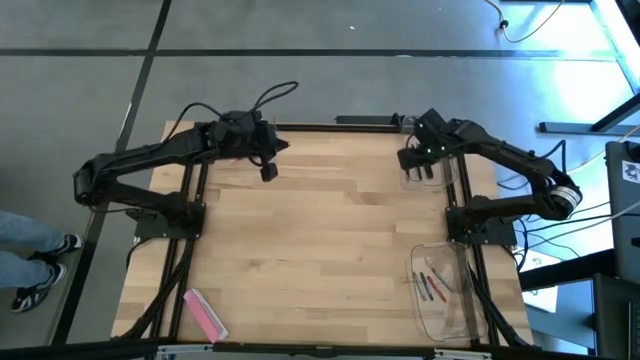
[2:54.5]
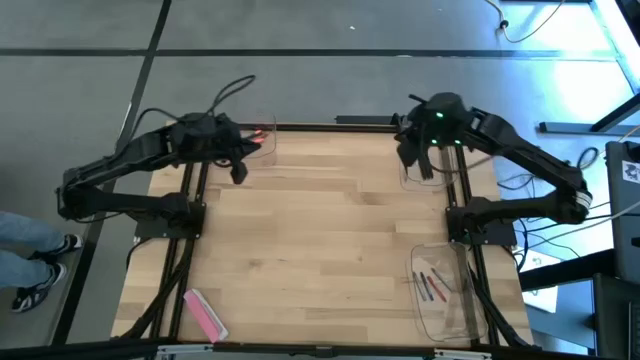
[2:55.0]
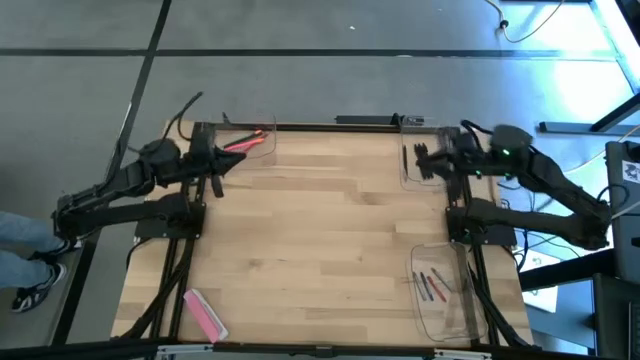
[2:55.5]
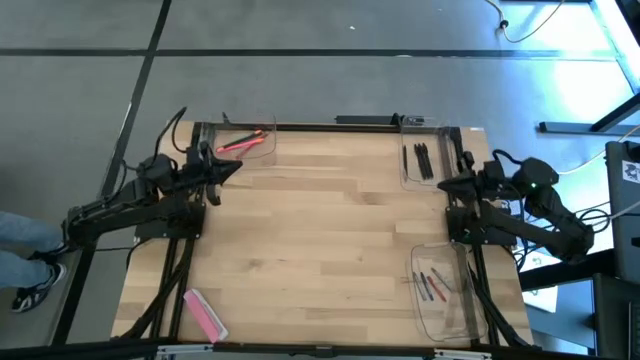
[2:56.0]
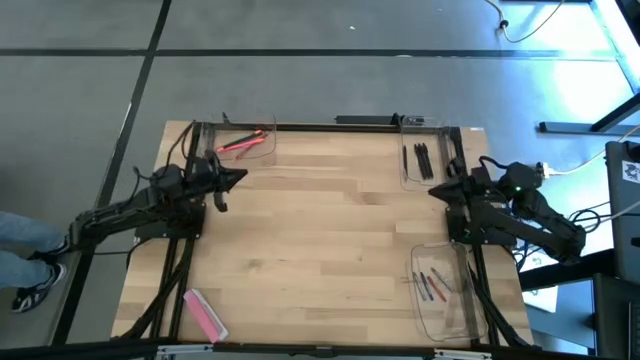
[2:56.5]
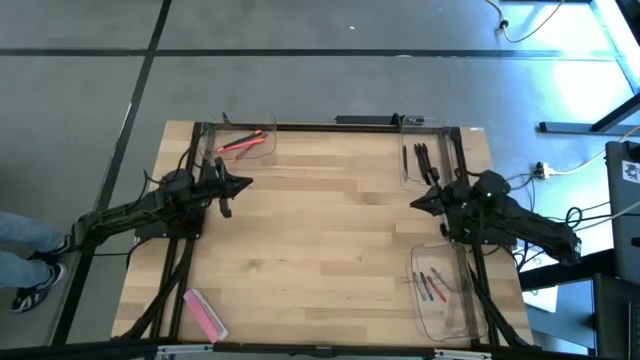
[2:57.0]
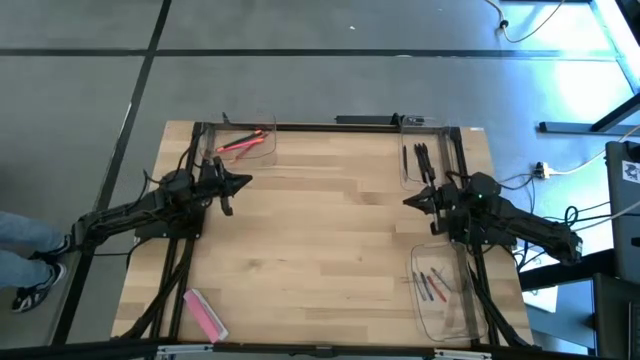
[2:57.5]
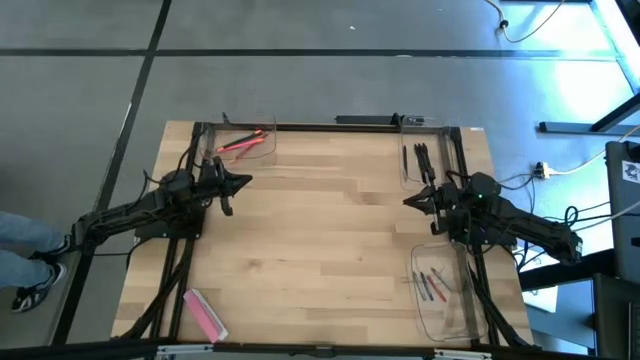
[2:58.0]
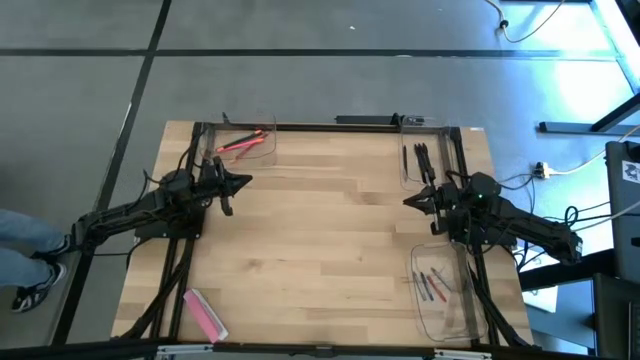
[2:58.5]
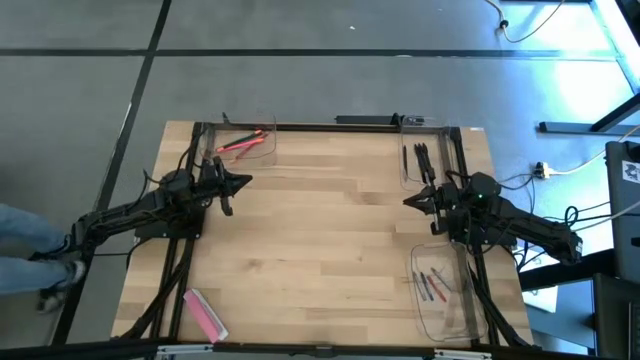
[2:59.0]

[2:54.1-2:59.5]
Task: Sort crayons/erasers/pens/pencils in bins
Return to Home Position

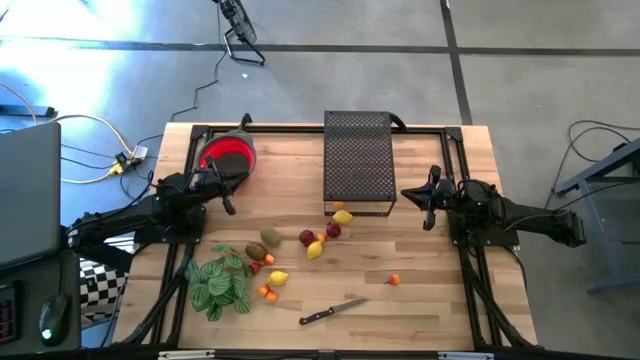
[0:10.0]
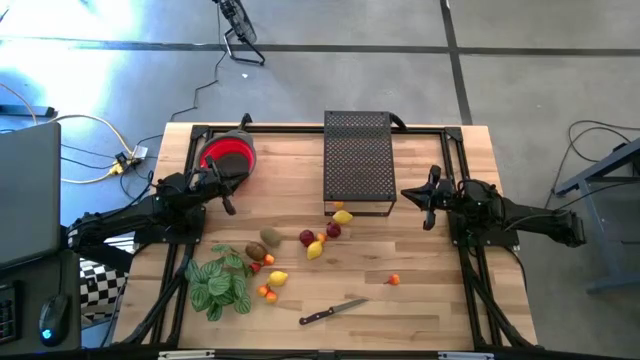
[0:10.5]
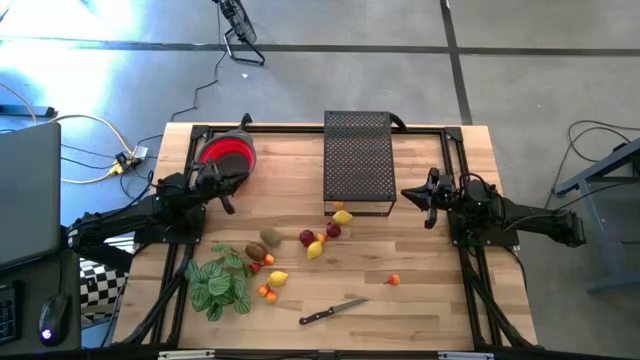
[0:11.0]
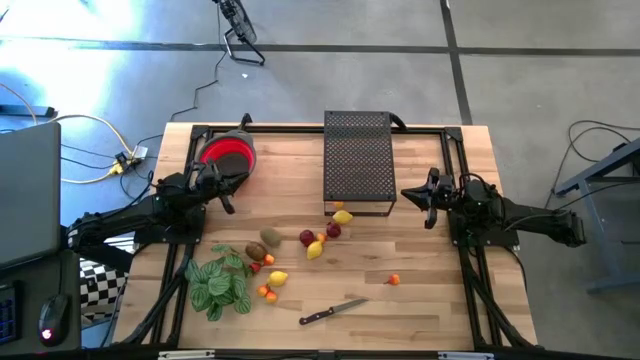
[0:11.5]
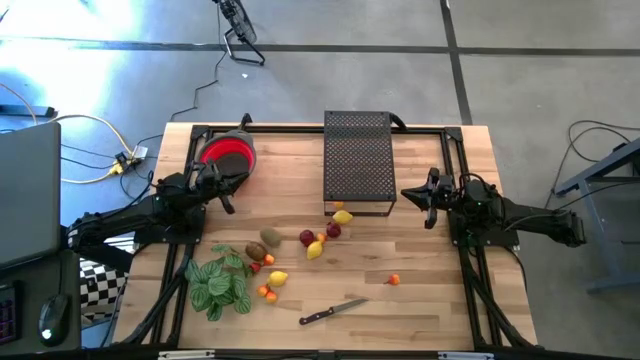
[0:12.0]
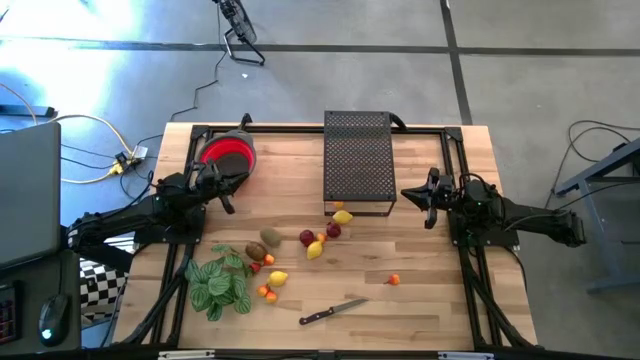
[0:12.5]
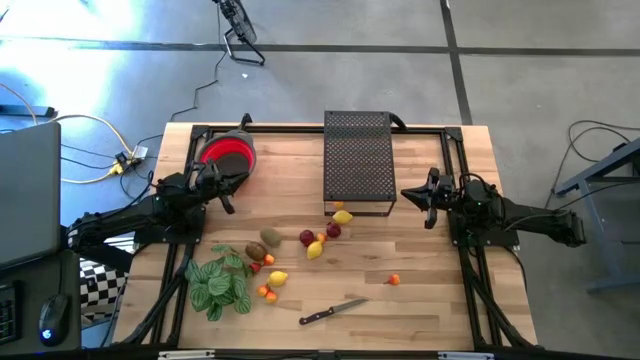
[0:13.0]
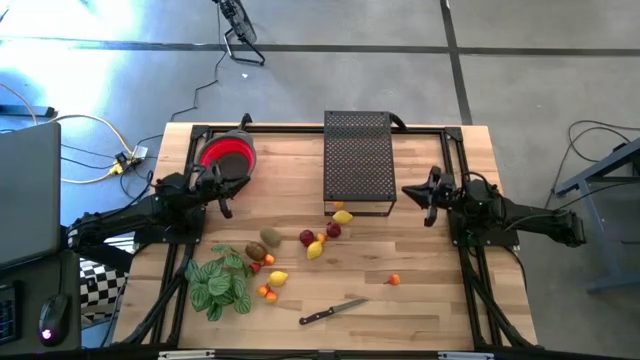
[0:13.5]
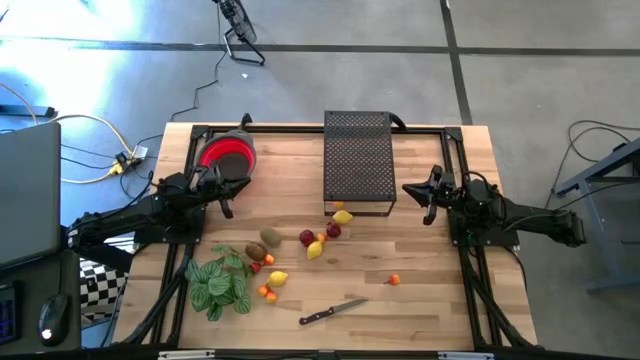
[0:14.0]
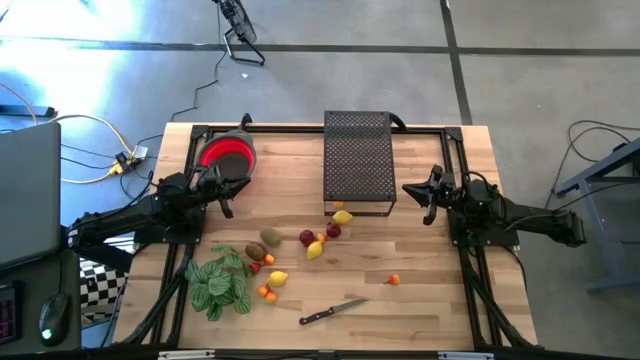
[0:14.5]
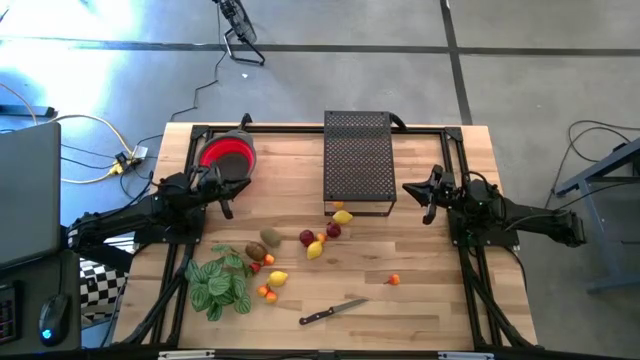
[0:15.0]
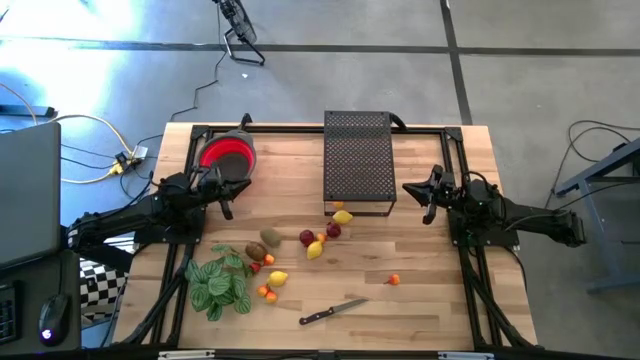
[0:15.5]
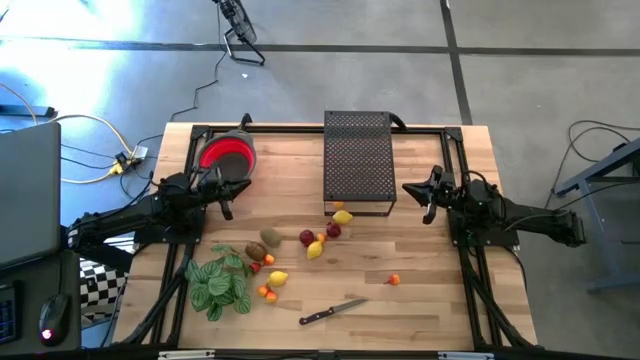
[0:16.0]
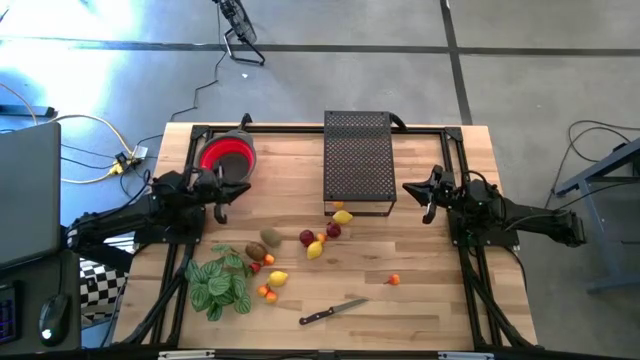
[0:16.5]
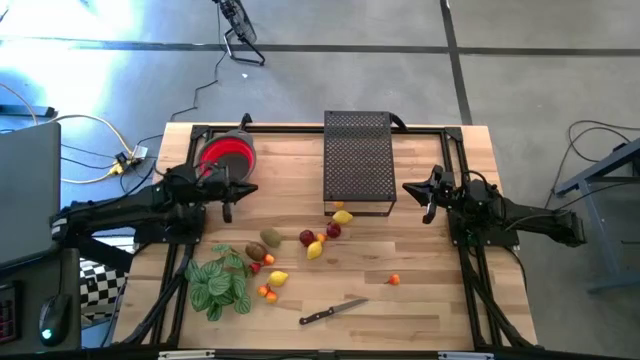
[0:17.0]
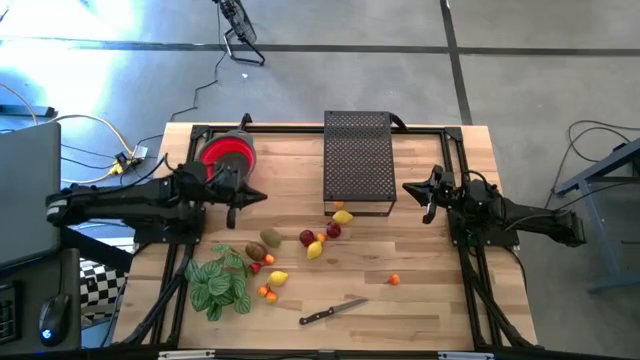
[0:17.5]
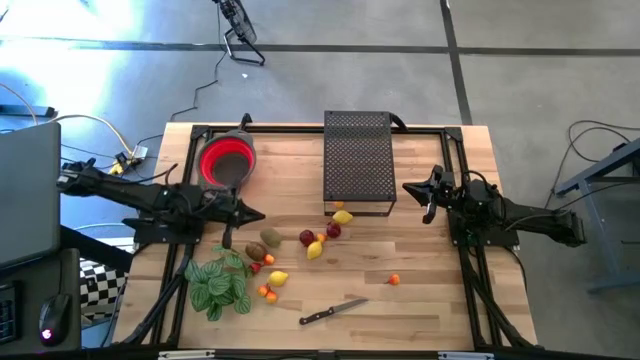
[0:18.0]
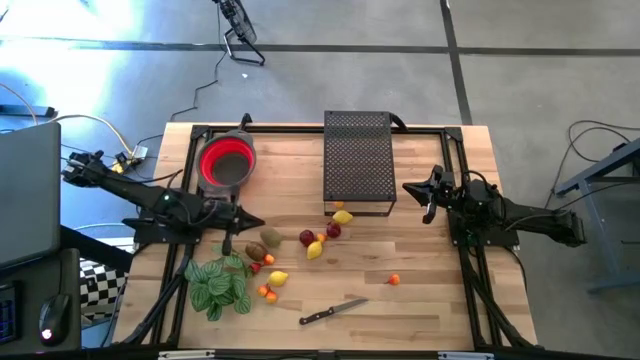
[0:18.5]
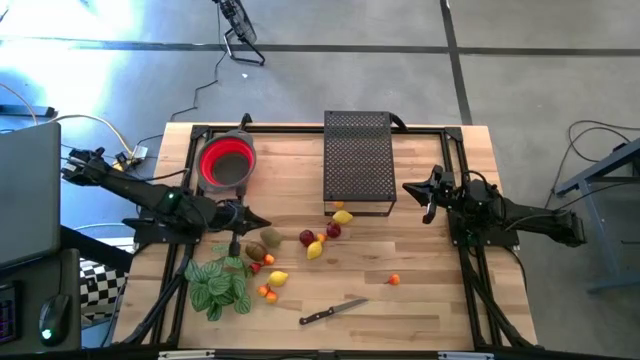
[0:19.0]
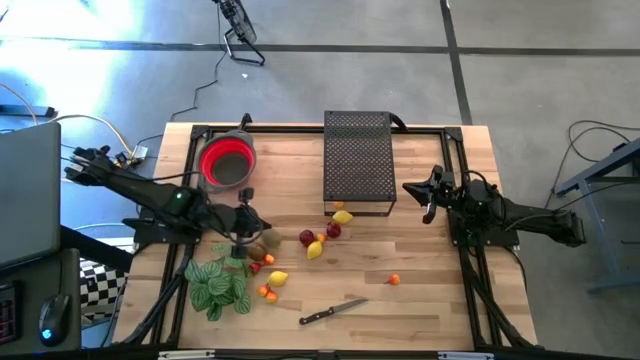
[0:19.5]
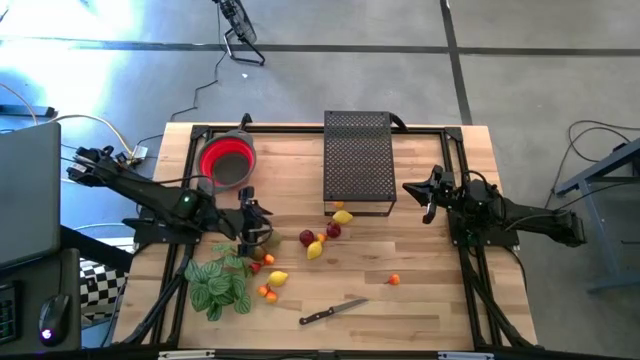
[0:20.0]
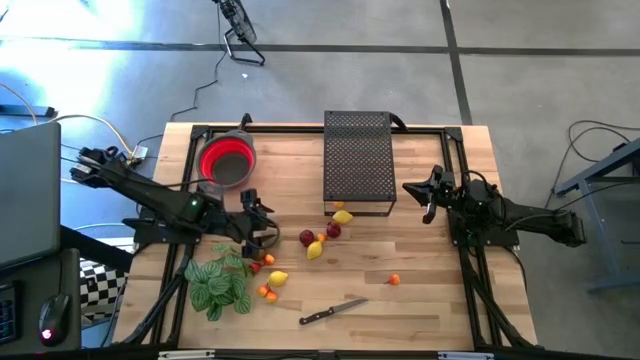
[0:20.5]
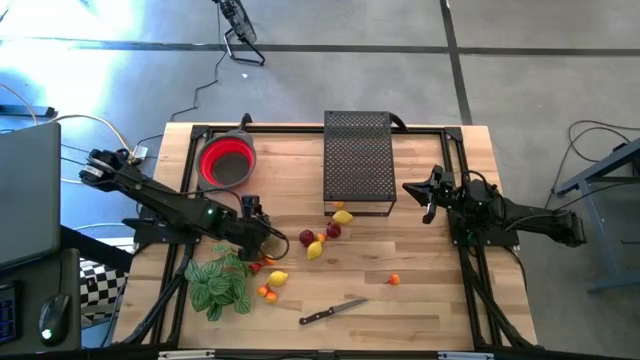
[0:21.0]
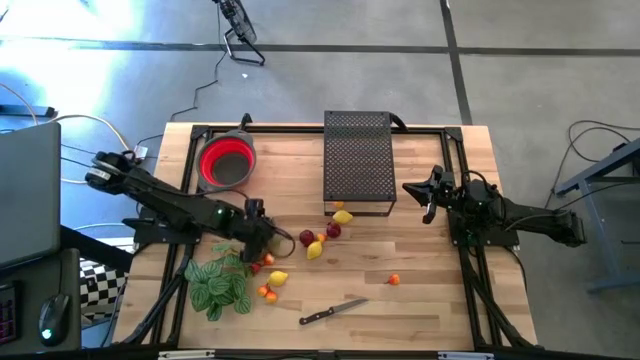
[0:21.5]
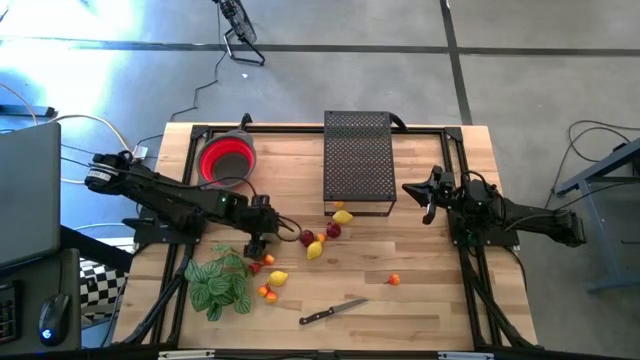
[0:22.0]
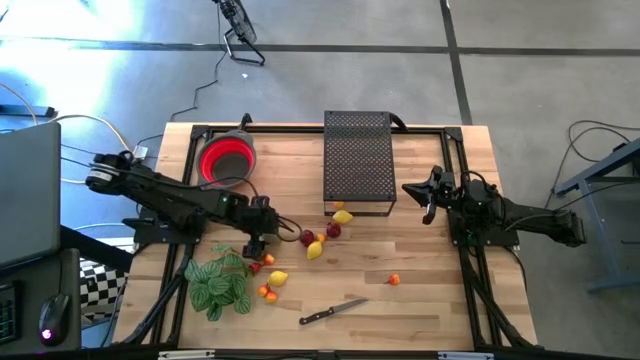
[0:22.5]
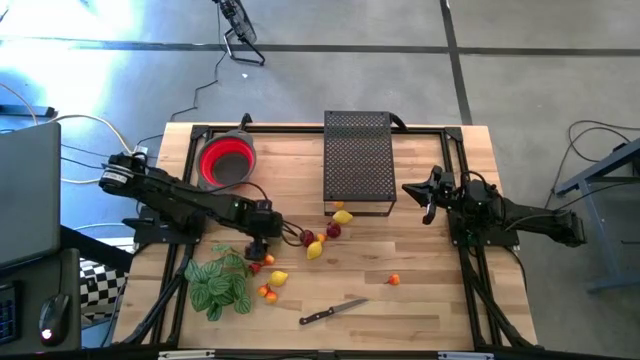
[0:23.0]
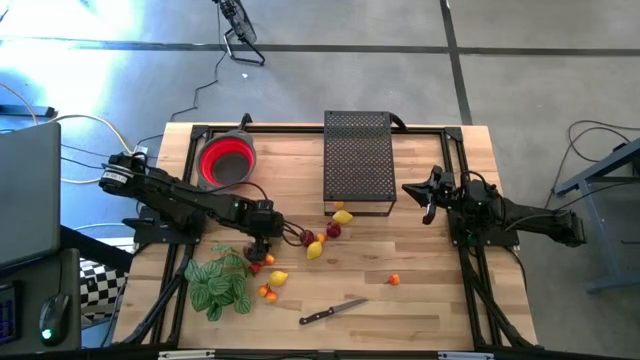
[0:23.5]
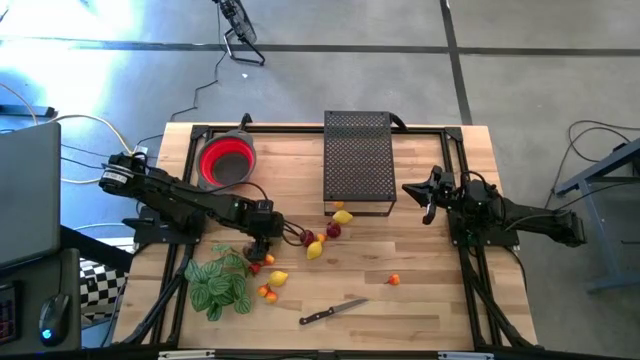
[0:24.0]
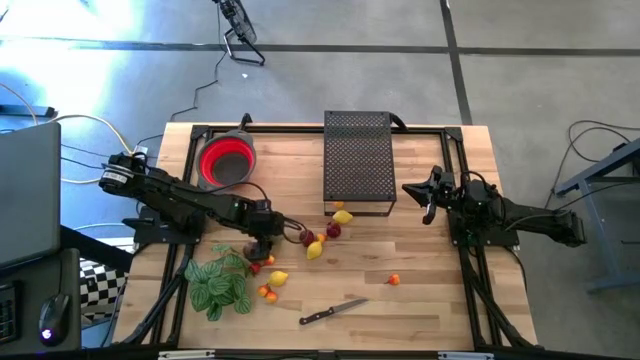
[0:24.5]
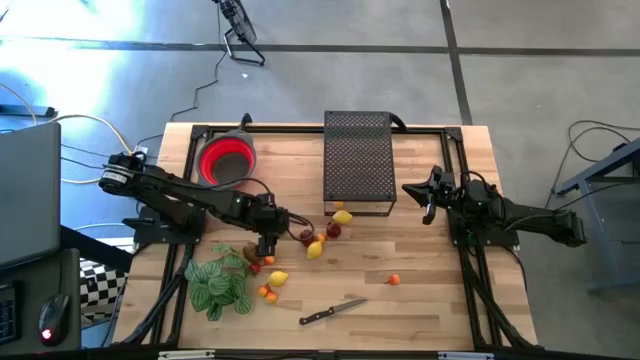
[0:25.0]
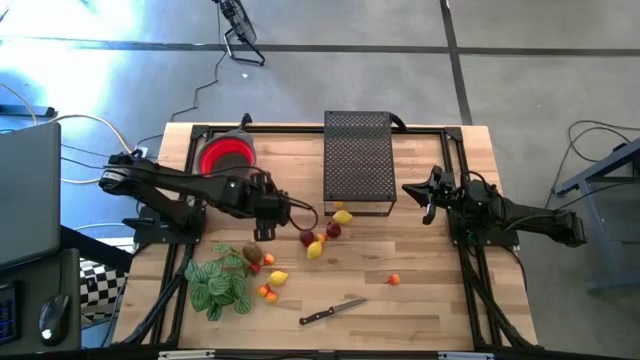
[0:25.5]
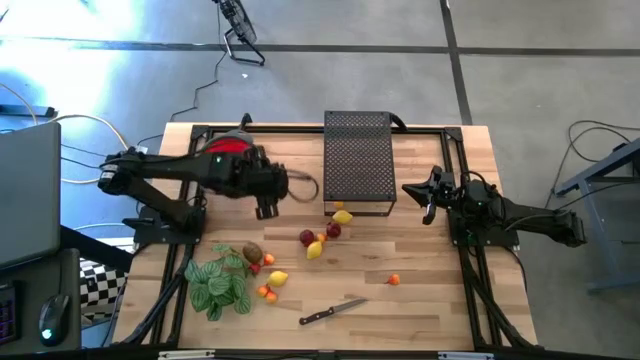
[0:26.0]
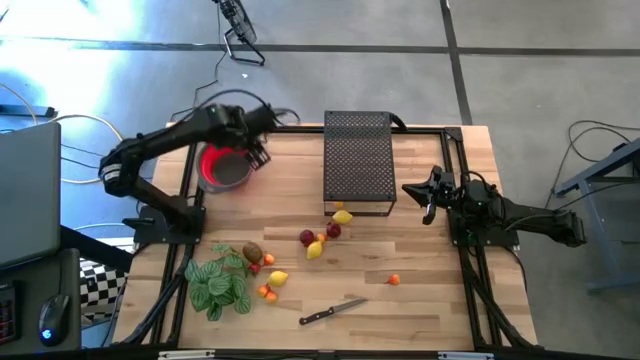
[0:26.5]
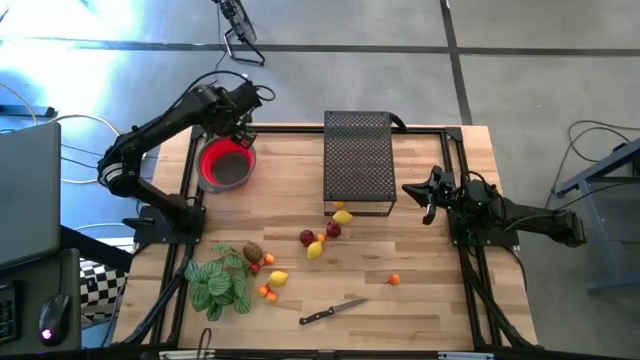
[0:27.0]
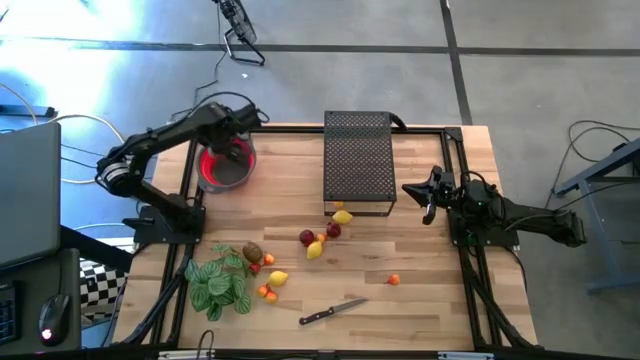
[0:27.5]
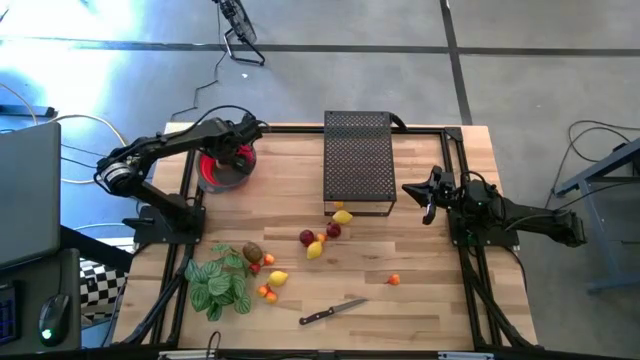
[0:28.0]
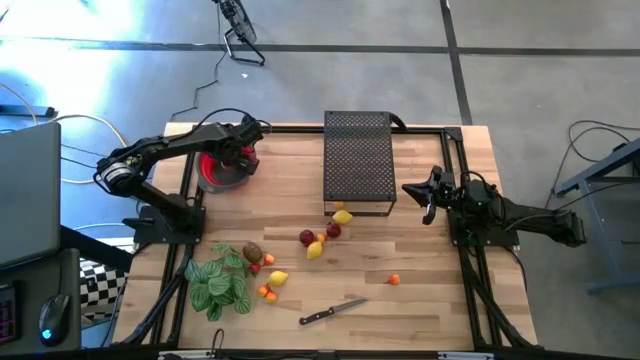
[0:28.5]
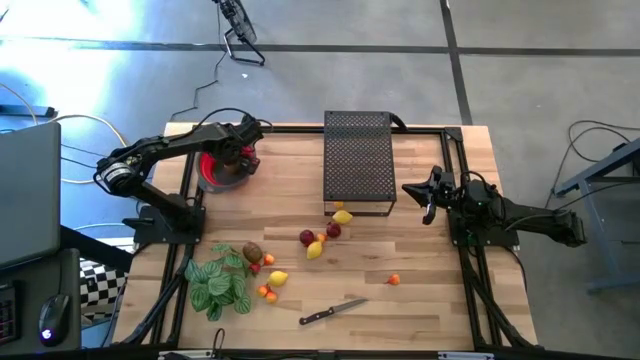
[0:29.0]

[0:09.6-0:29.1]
Task: Pick & Place Fruit
Put the right green kiwi into strainer bowl
